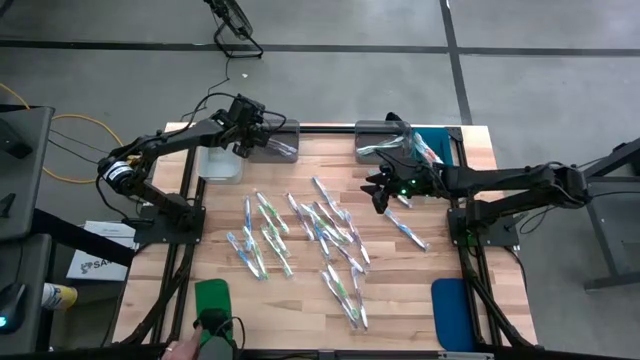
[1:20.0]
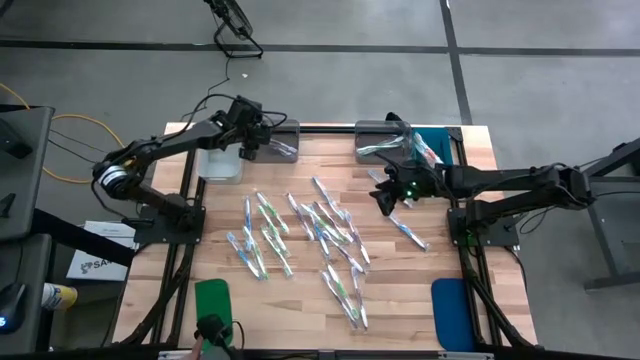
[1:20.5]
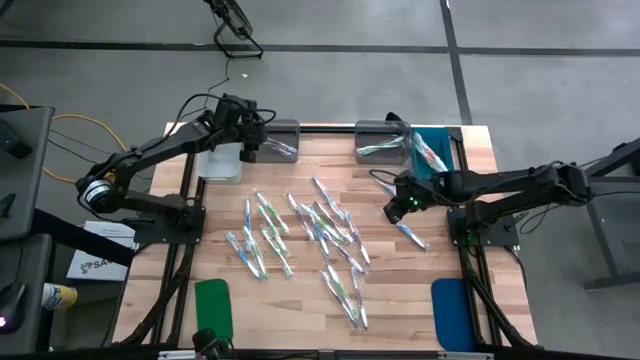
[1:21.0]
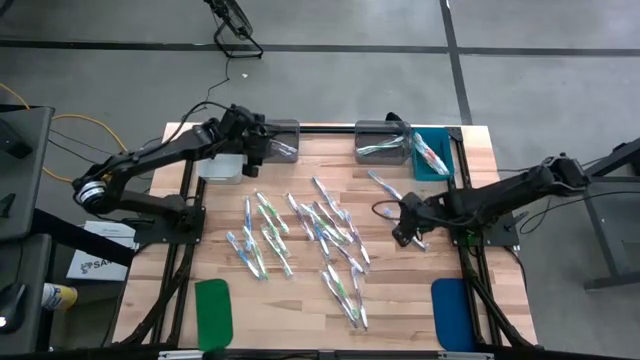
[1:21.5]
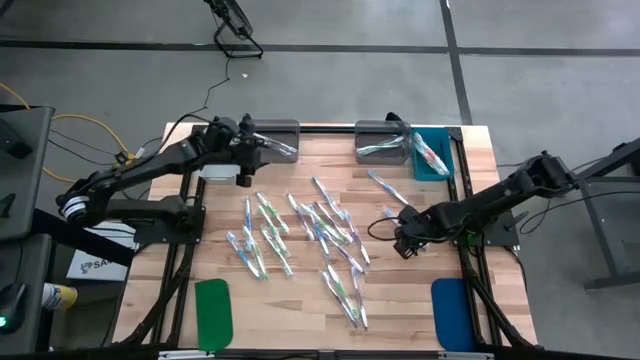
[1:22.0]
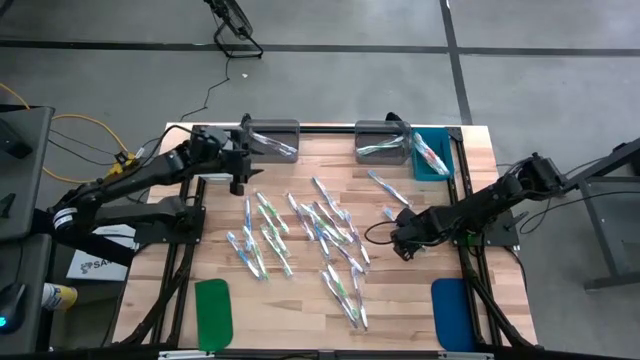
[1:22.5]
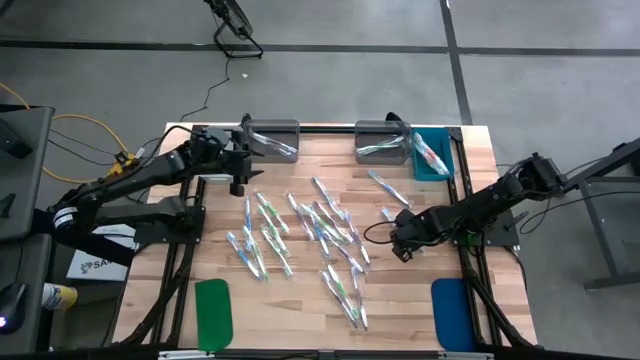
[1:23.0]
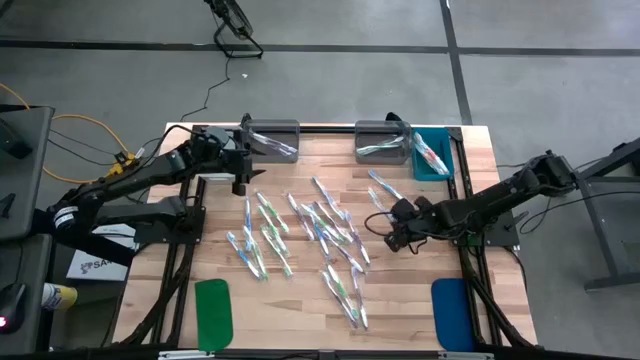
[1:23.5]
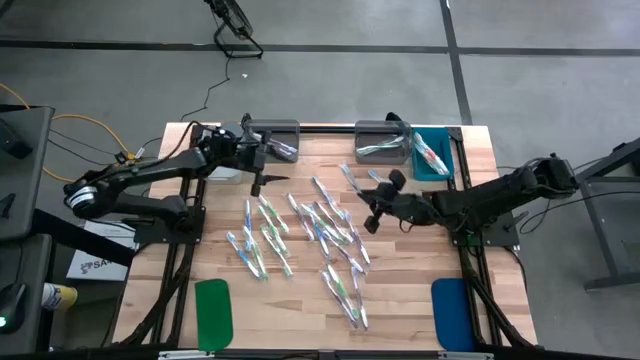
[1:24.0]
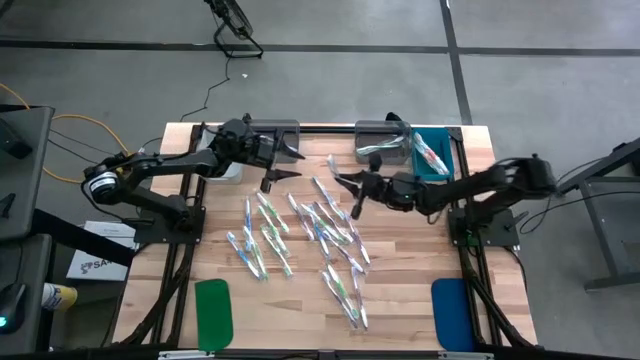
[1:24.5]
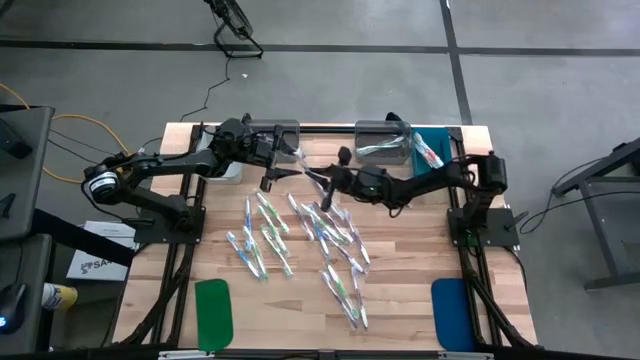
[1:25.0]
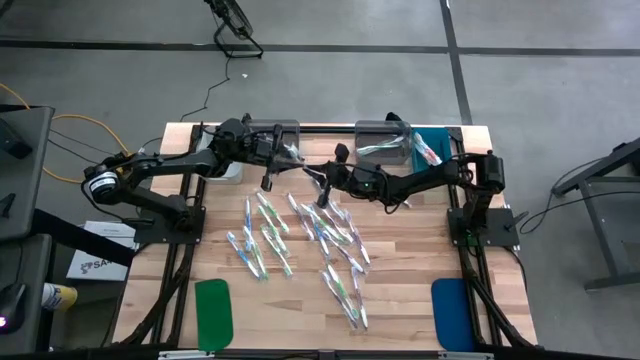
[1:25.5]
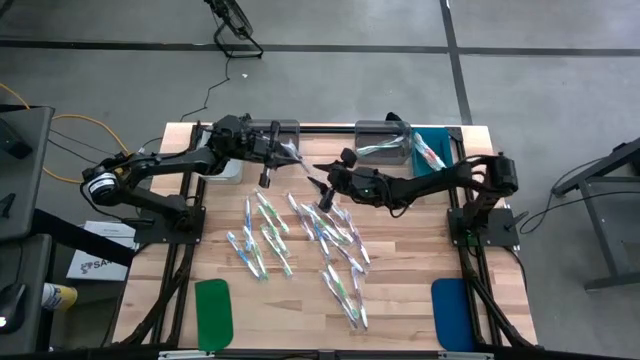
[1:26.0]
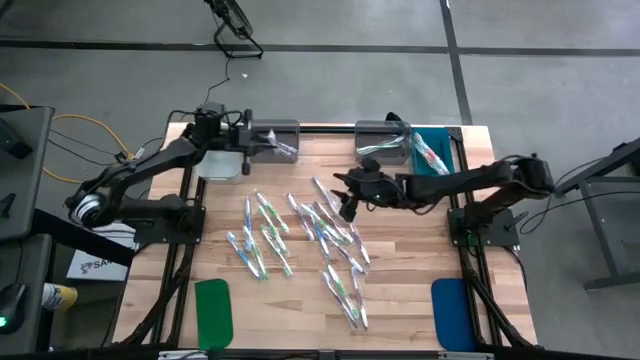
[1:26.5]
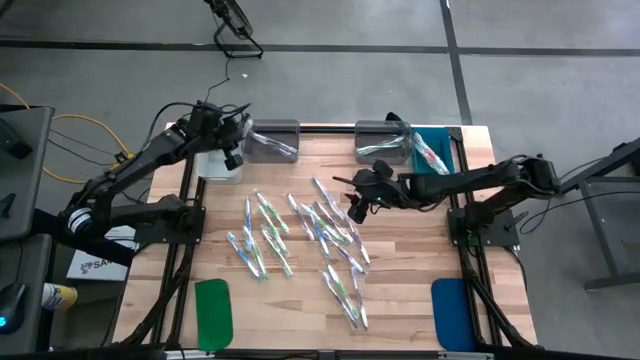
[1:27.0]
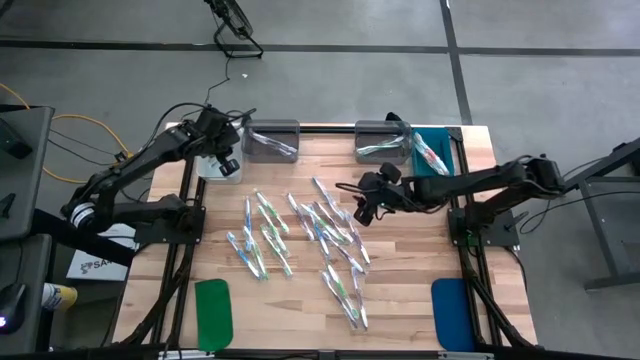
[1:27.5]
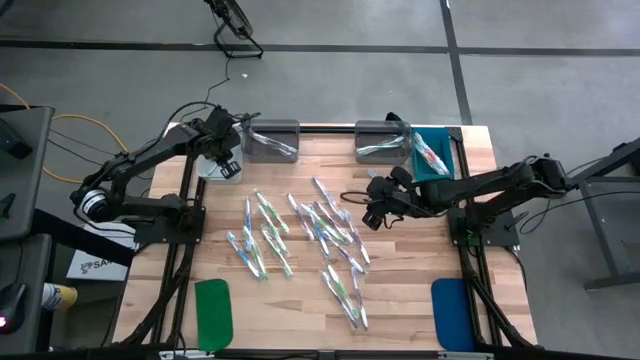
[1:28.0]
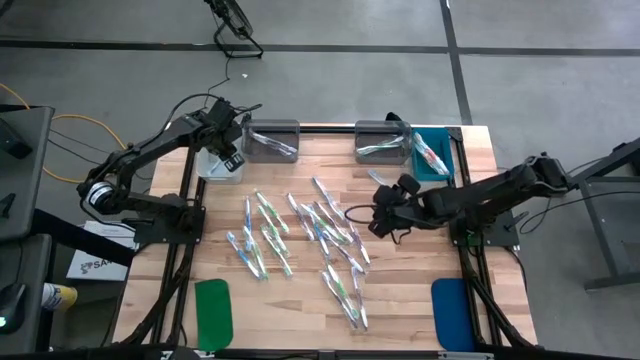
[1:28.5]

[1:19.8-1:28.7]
Task: Pick & Place Toothbrushes
Put the blue toothbrush into the white bin

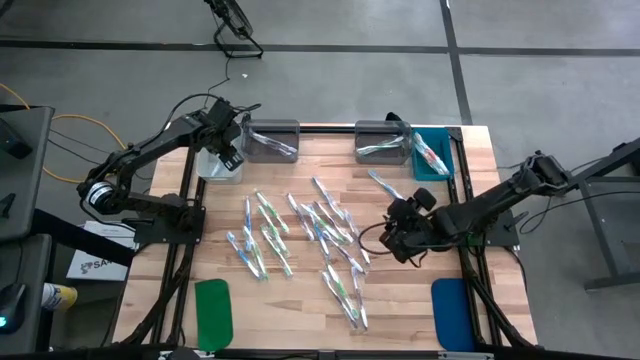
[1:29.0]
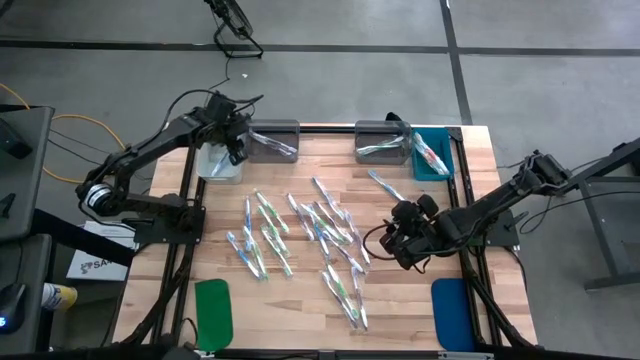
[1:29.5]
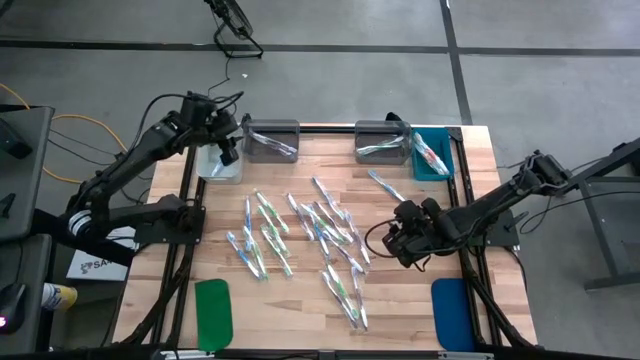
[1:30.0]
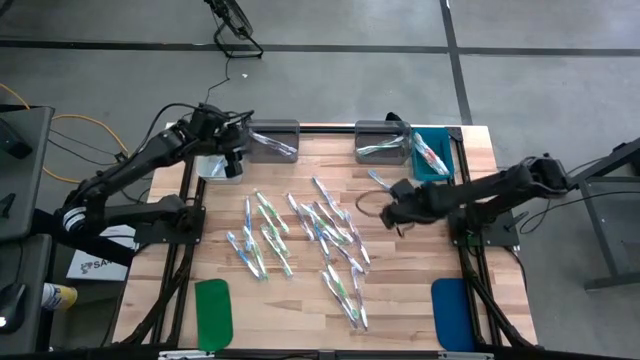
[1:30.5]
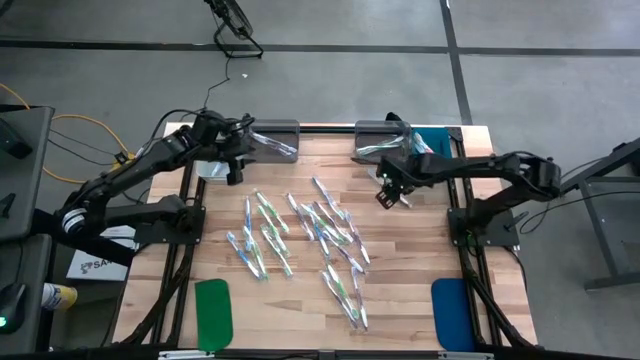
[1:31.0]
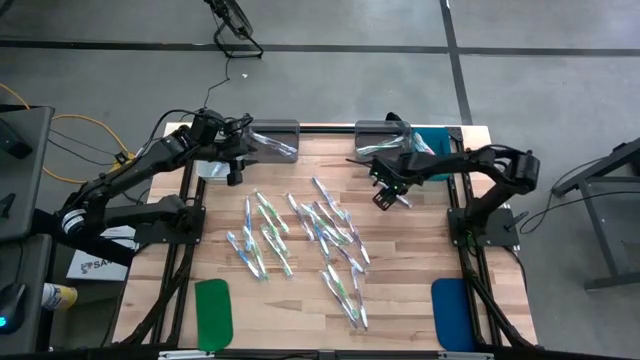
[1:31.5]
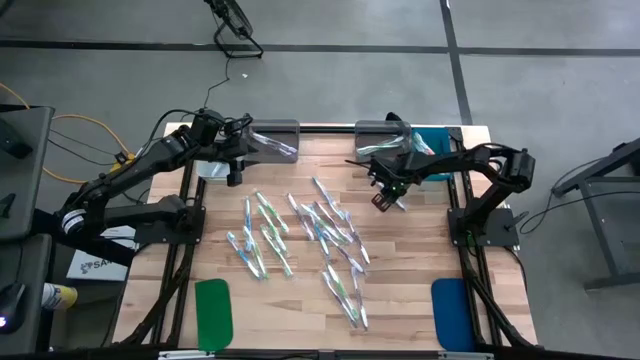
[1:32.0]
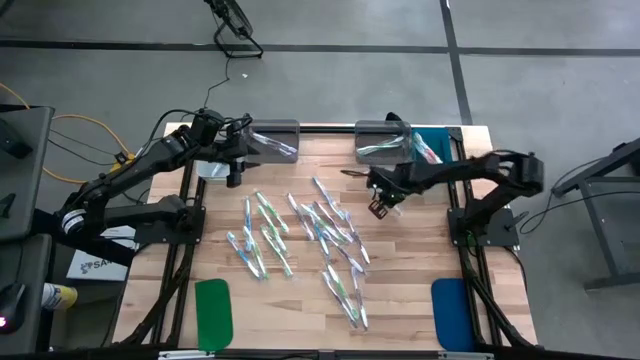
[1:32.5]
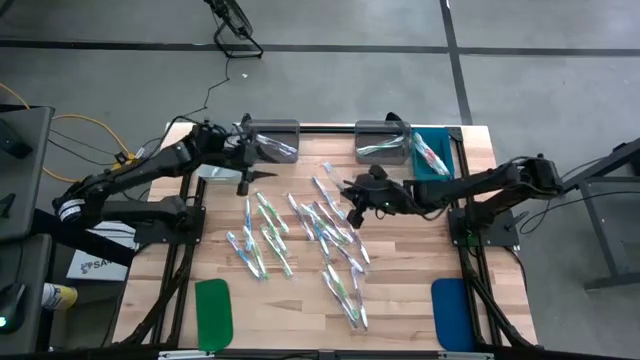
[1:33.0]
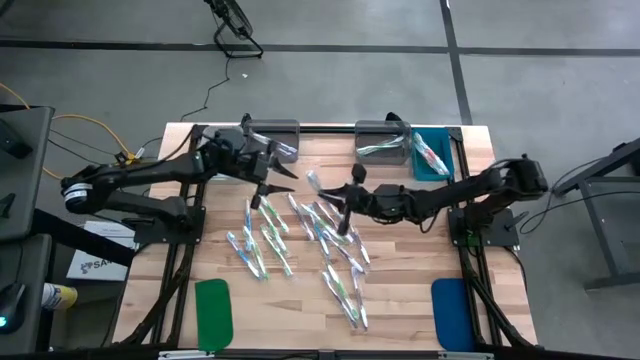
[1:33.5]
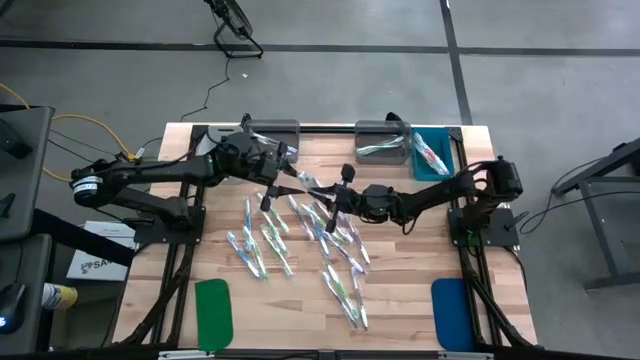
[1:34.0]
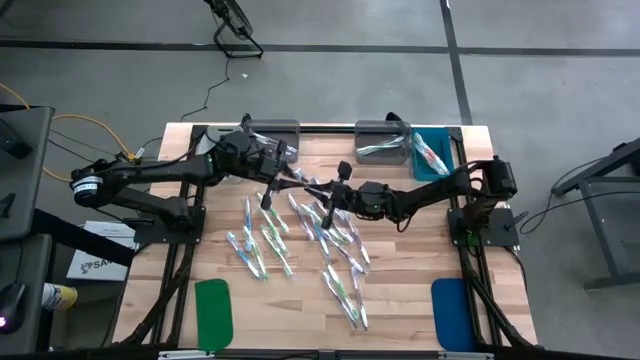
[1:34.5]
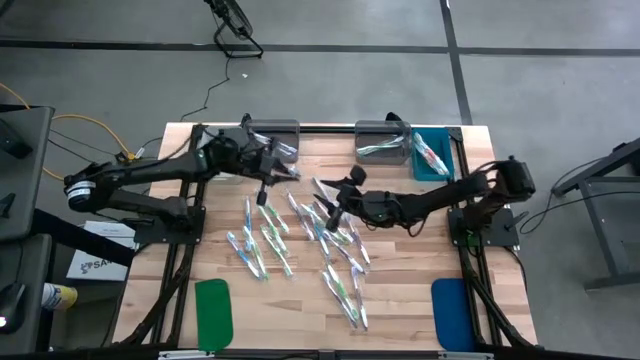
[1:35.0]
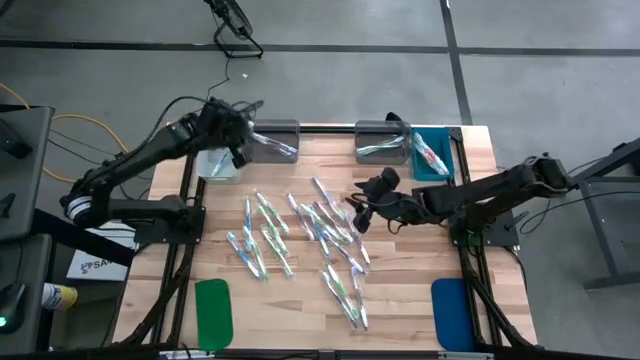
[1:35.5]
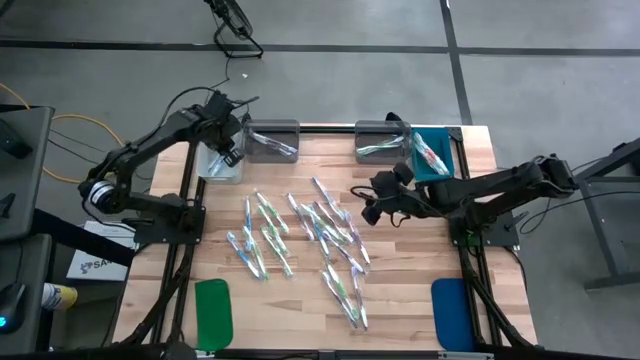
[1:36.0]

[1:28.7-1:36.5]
Put the blue toothbrush into the white bin

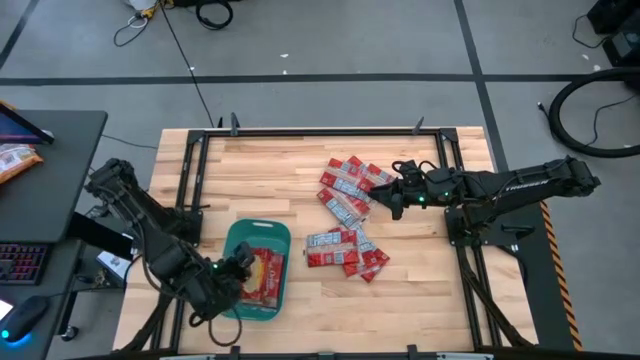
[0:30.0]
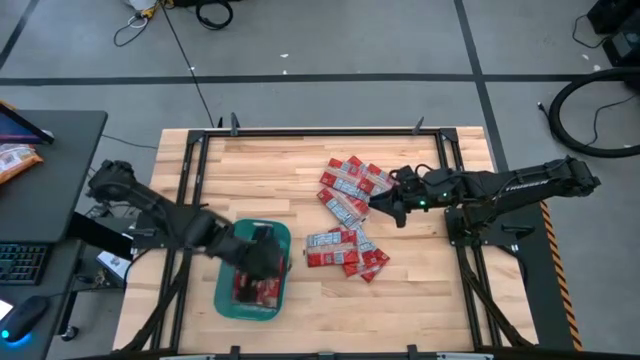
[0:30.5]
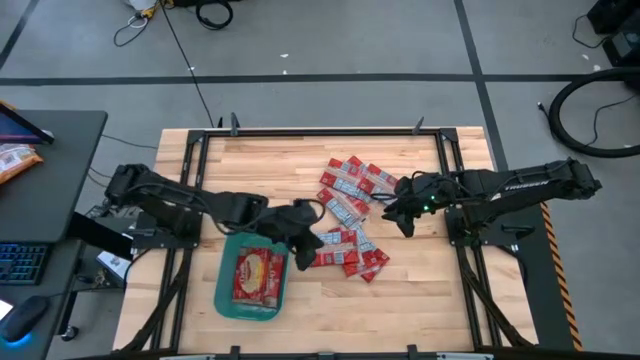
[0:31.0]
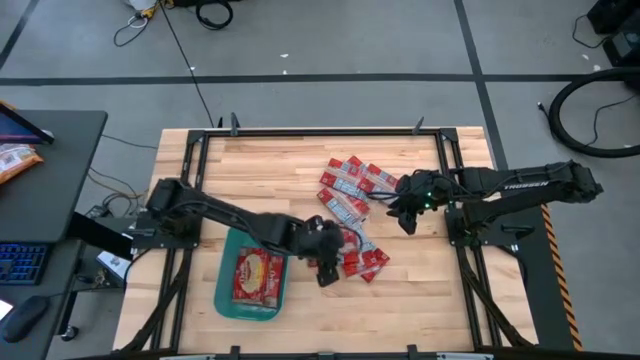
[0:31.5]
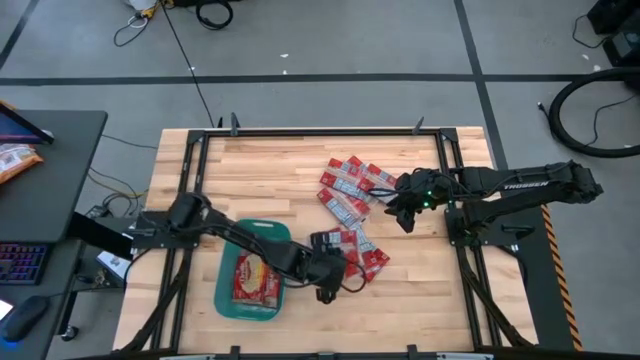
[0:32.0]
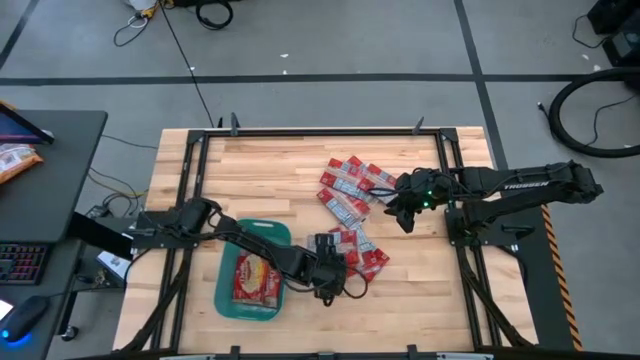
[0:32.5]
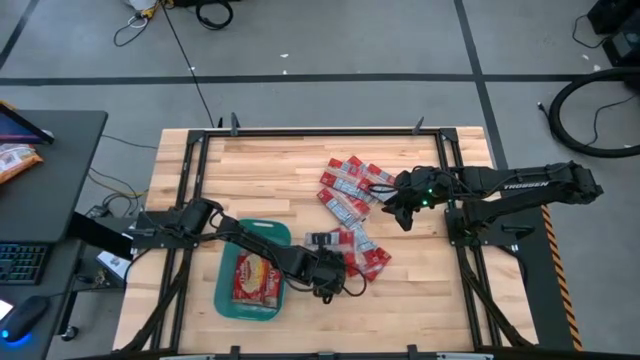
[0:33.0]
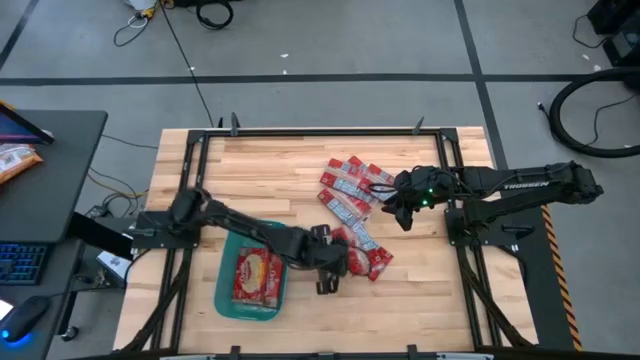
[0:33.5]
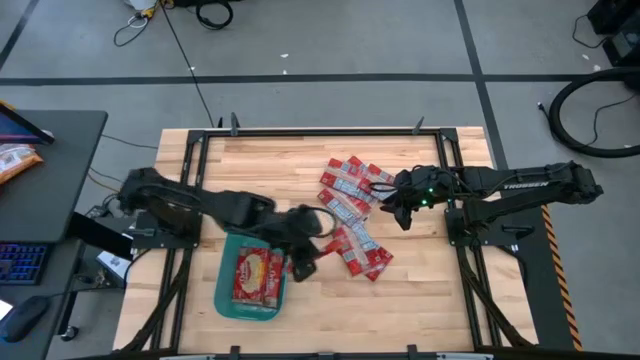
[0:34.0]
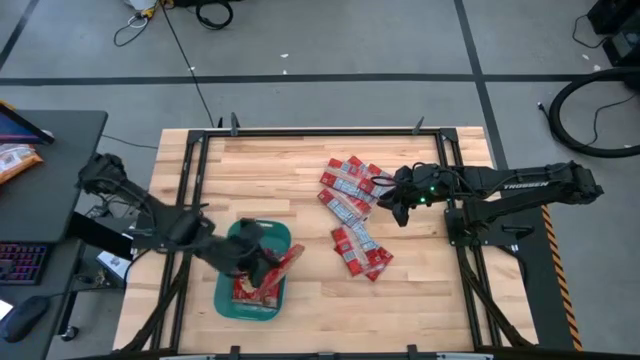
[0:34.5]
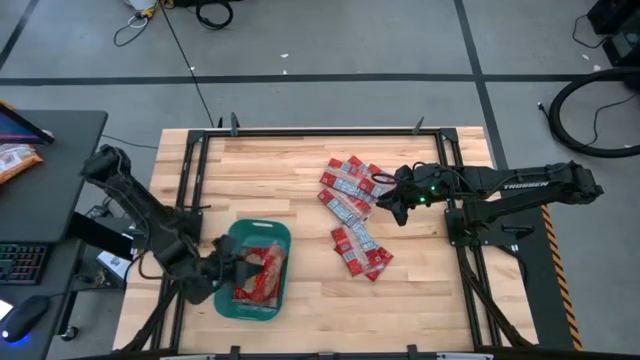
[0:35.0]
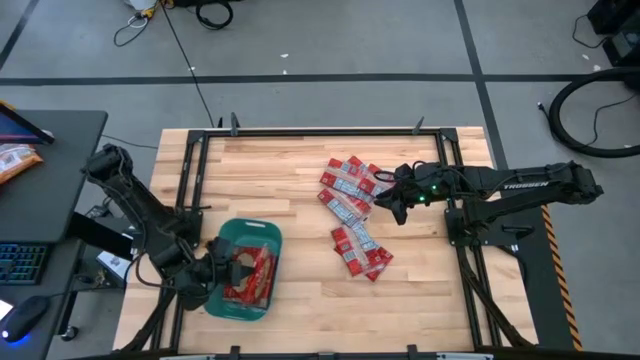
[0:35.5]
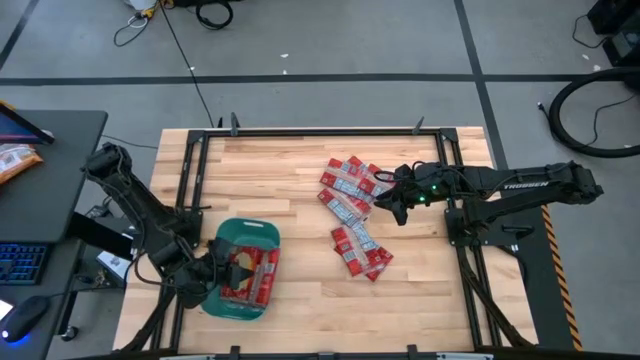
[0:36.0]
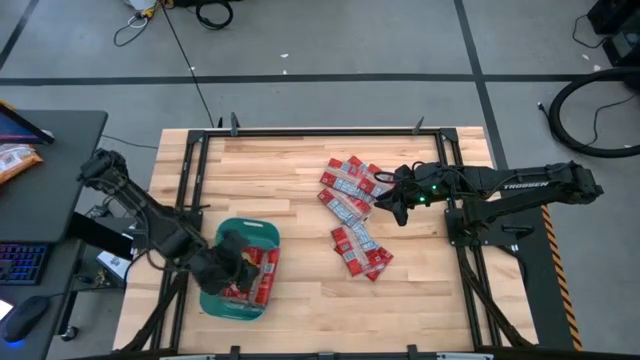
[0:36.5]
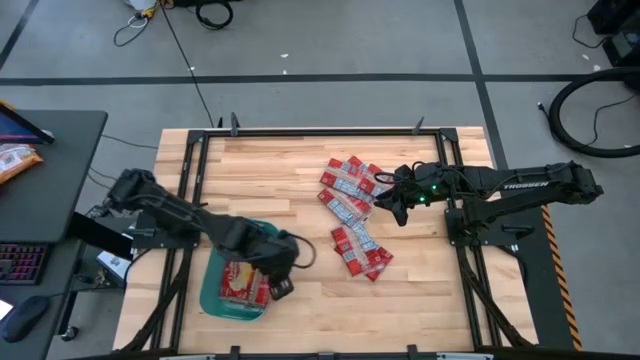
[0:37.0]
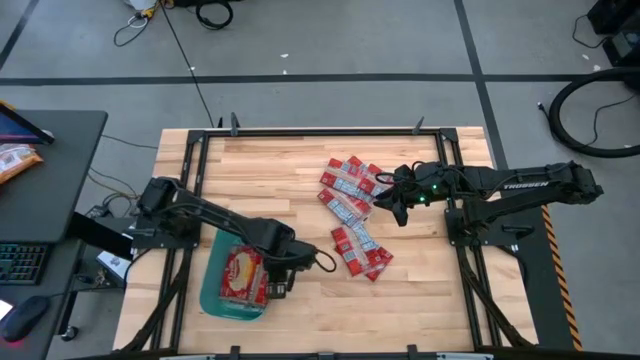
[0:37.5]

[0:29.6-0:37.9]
Task: Sort popcorn bags into baskets
Put the red popcorn bag into the green bin
